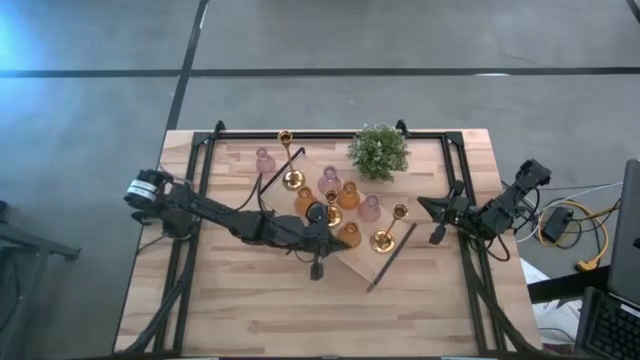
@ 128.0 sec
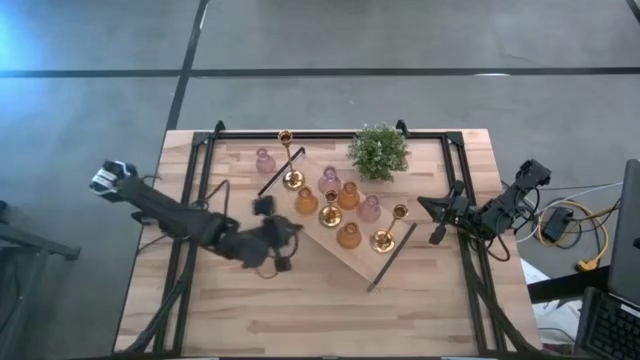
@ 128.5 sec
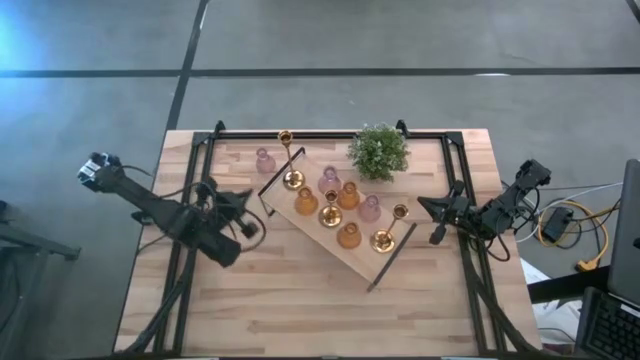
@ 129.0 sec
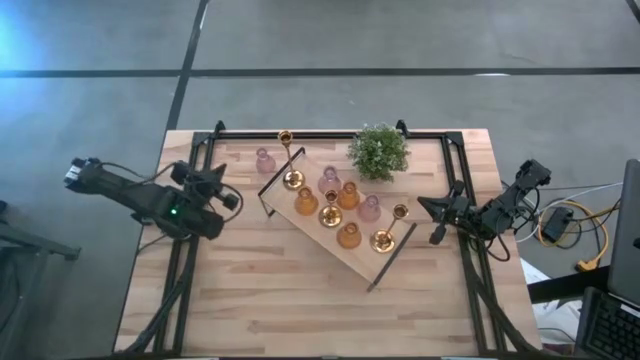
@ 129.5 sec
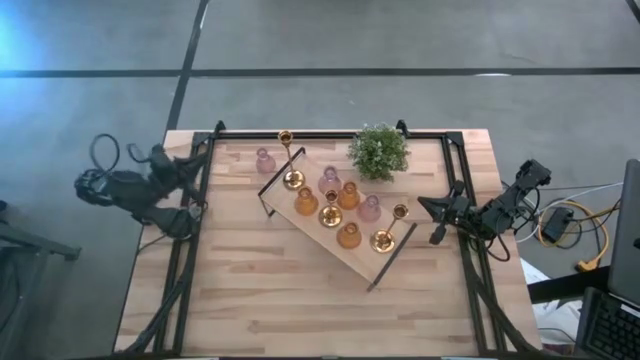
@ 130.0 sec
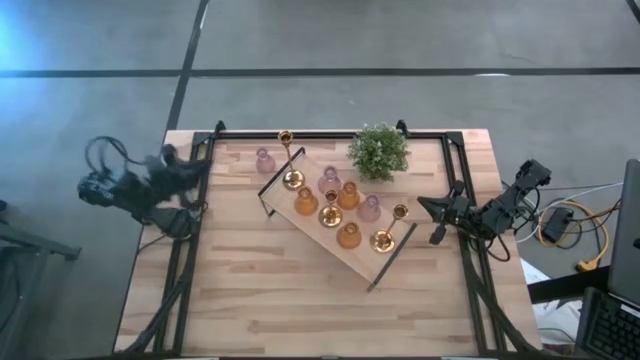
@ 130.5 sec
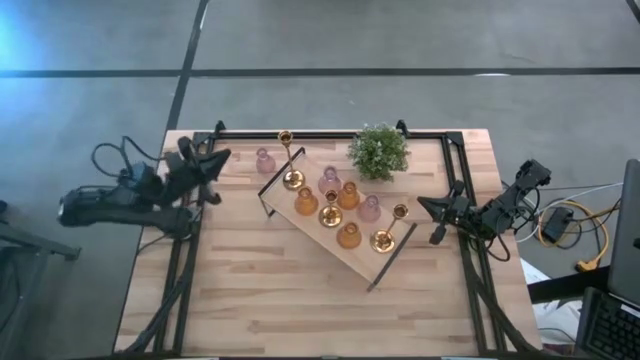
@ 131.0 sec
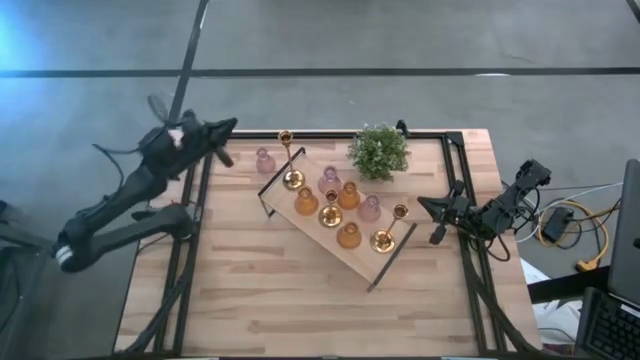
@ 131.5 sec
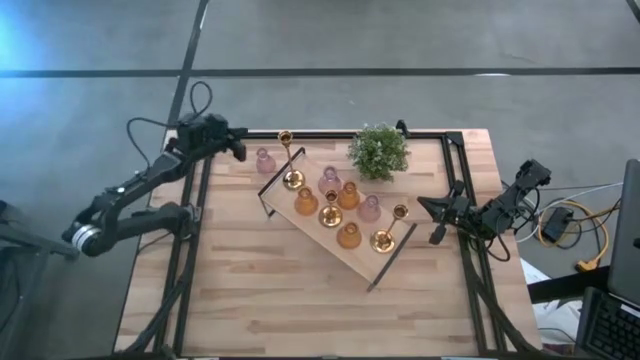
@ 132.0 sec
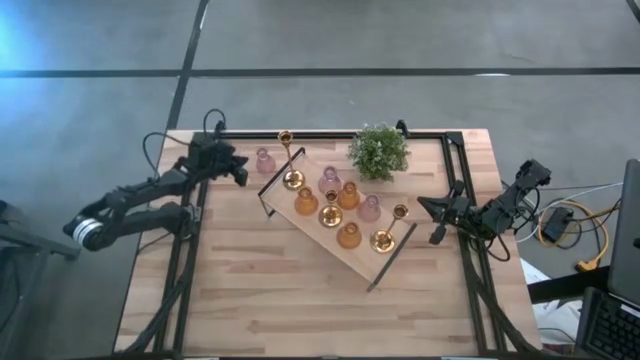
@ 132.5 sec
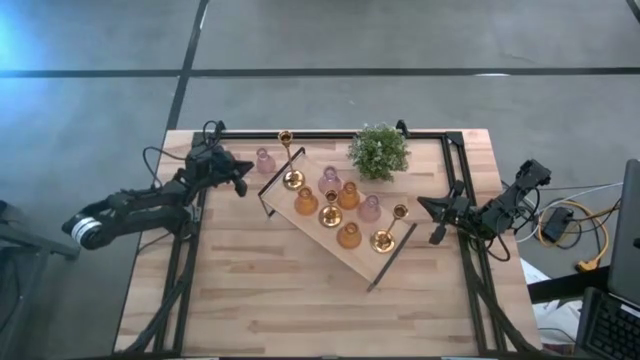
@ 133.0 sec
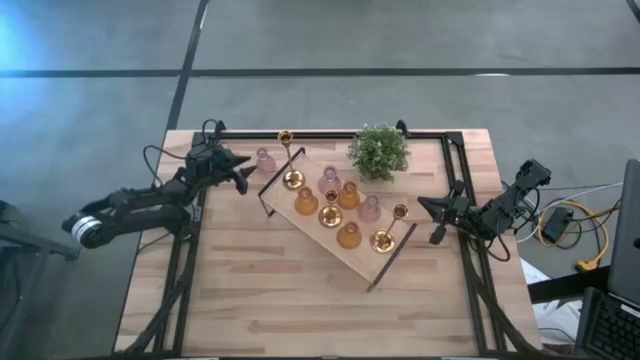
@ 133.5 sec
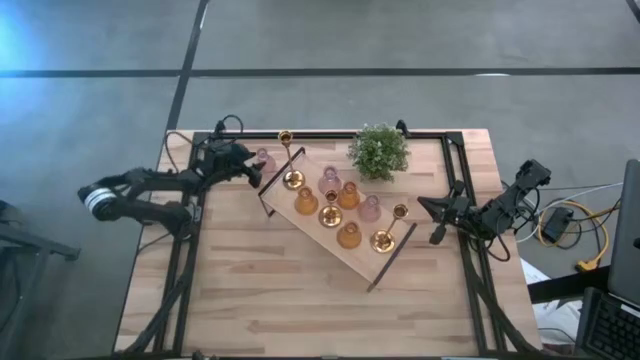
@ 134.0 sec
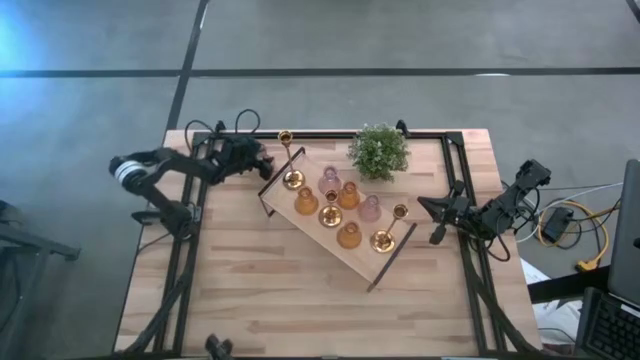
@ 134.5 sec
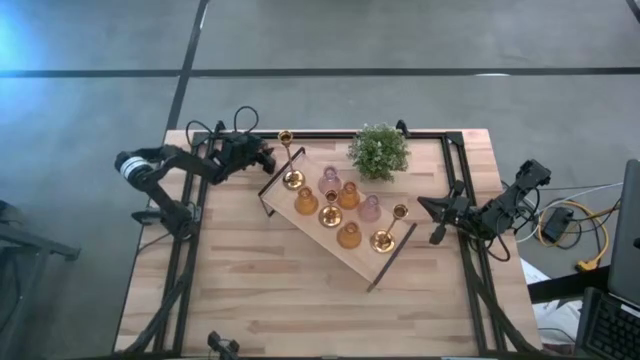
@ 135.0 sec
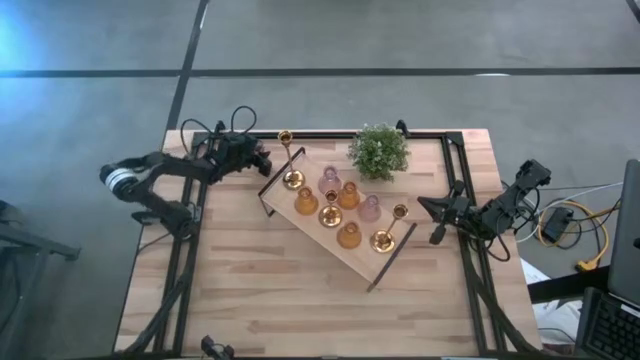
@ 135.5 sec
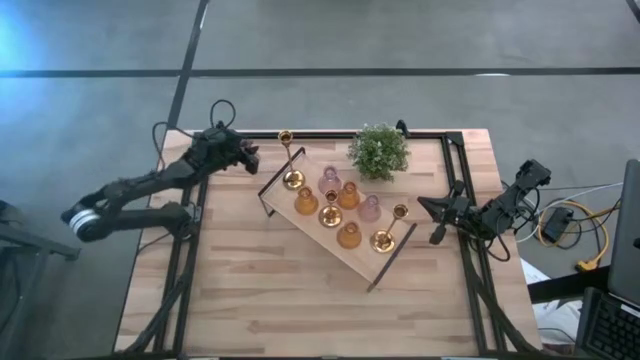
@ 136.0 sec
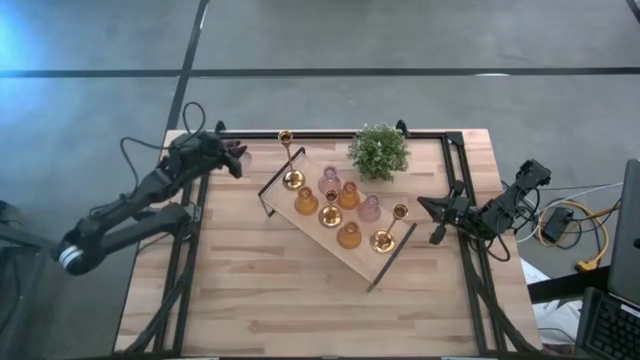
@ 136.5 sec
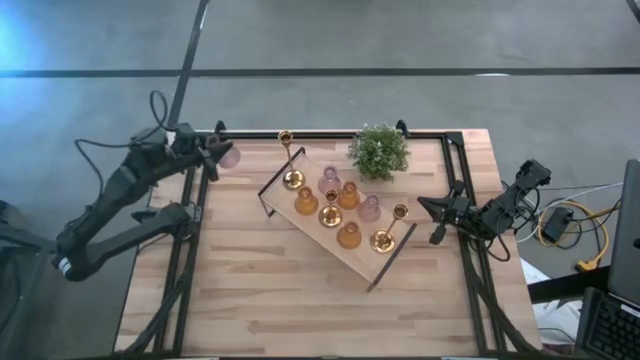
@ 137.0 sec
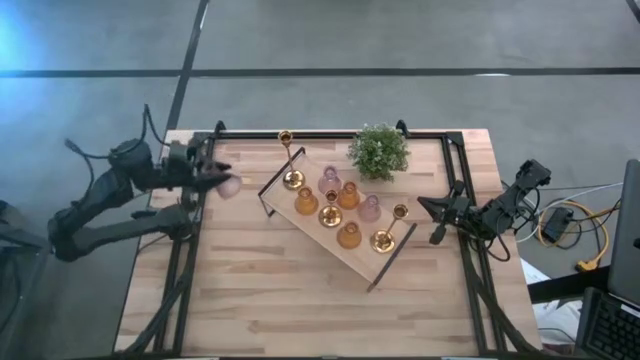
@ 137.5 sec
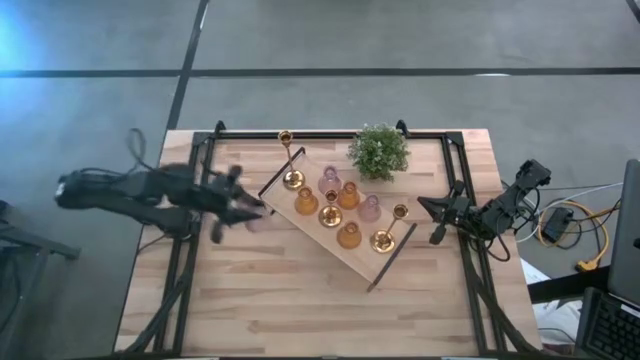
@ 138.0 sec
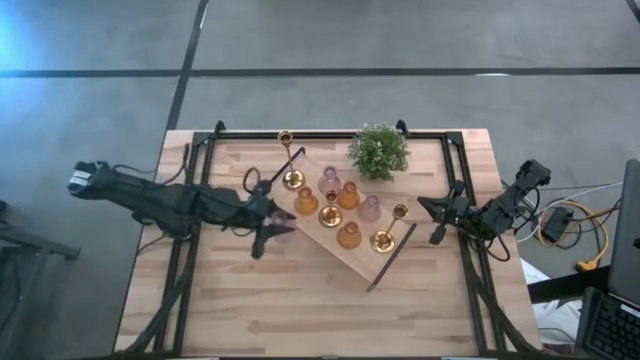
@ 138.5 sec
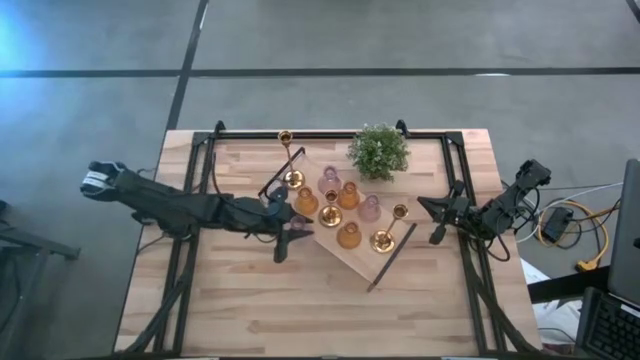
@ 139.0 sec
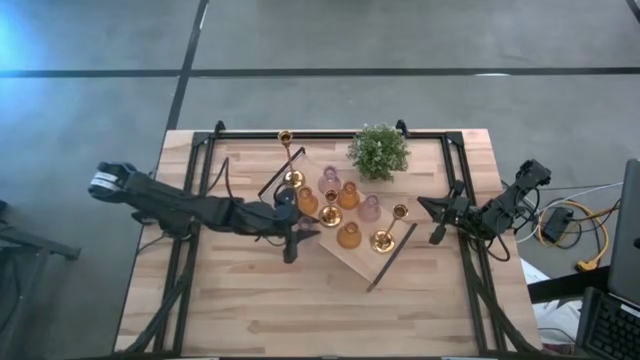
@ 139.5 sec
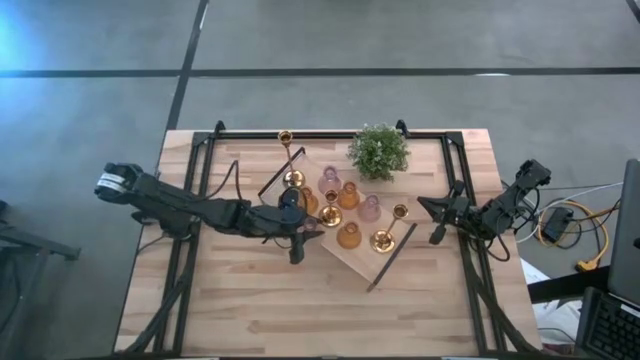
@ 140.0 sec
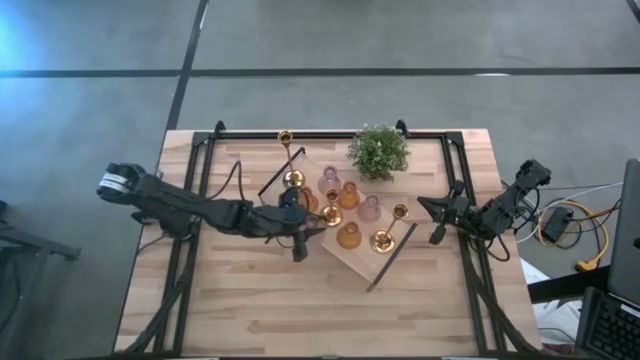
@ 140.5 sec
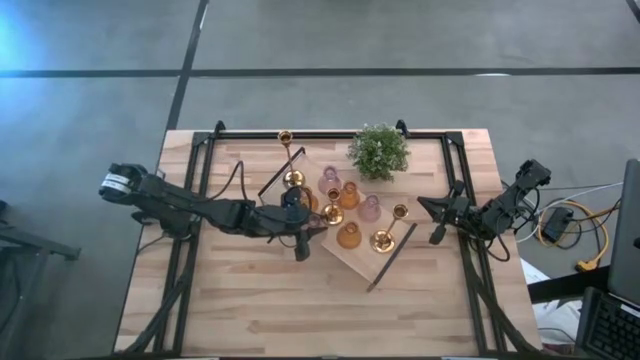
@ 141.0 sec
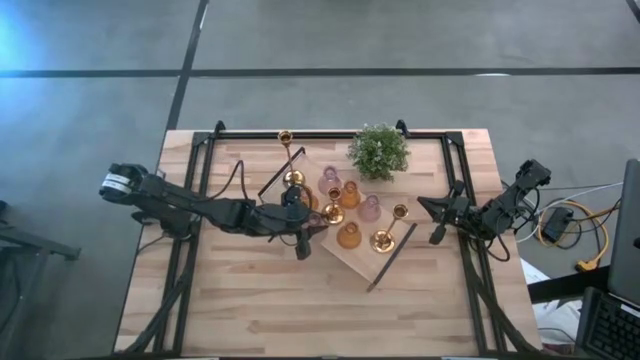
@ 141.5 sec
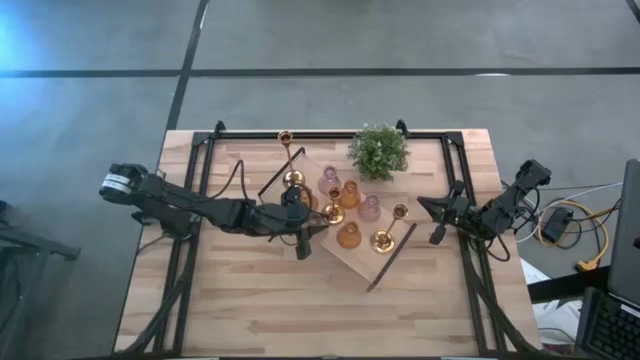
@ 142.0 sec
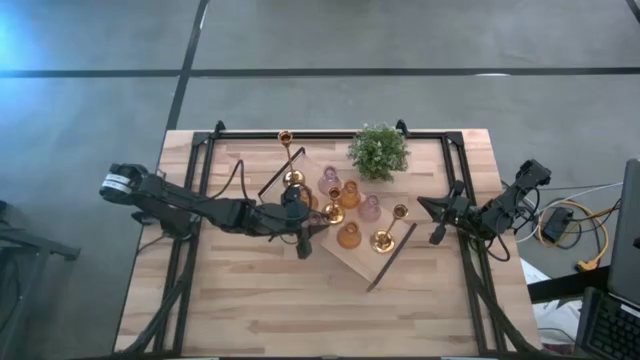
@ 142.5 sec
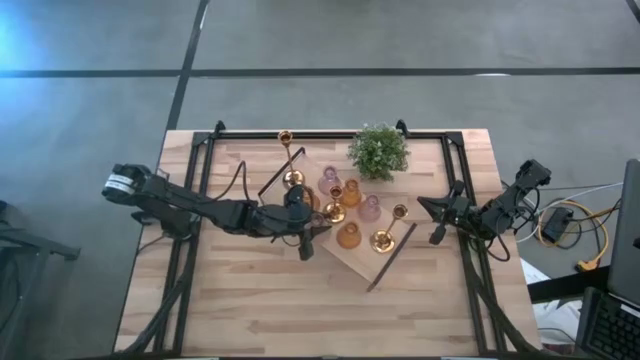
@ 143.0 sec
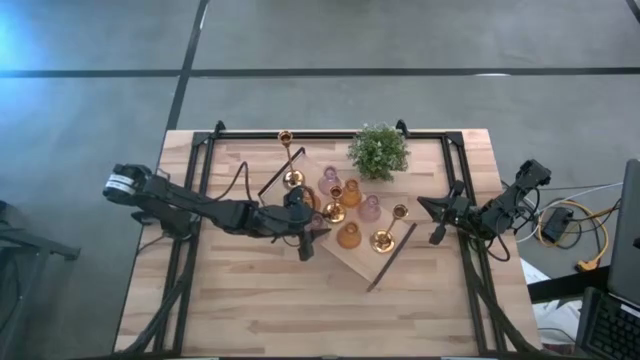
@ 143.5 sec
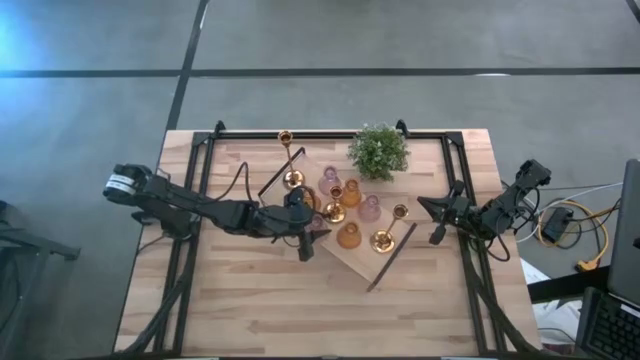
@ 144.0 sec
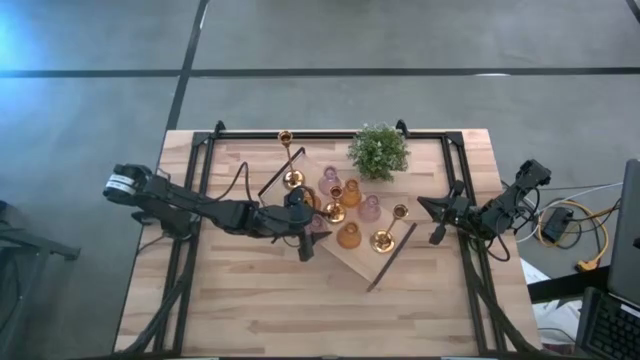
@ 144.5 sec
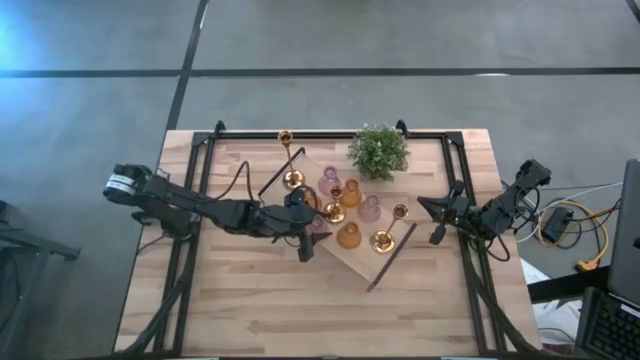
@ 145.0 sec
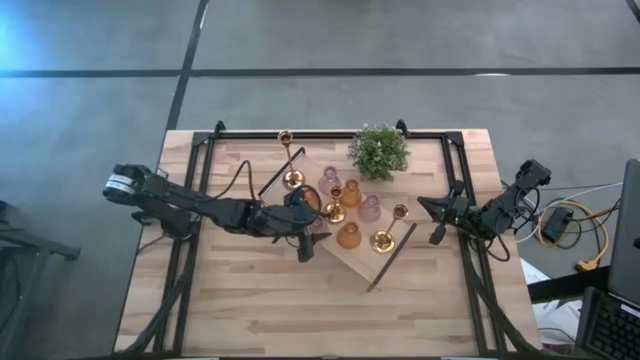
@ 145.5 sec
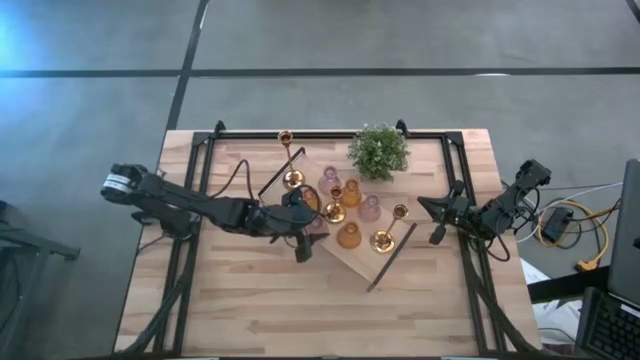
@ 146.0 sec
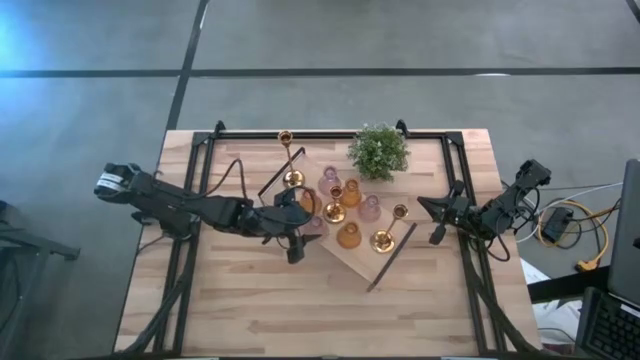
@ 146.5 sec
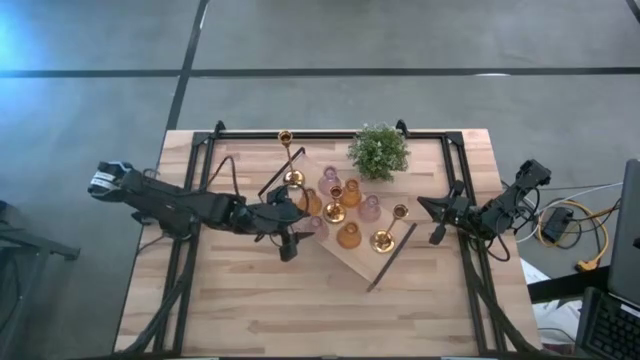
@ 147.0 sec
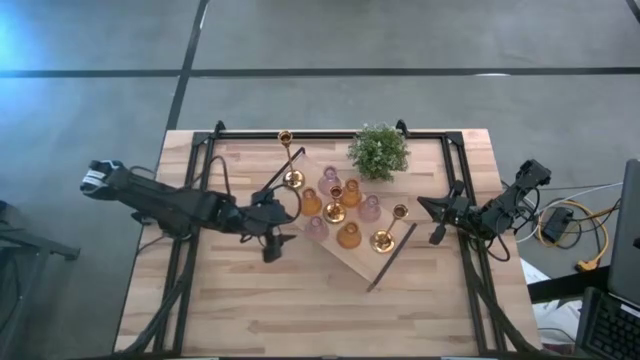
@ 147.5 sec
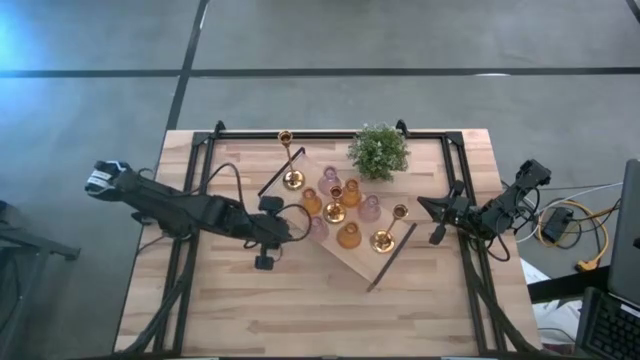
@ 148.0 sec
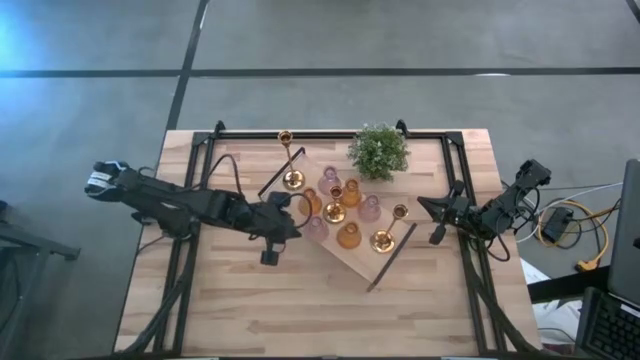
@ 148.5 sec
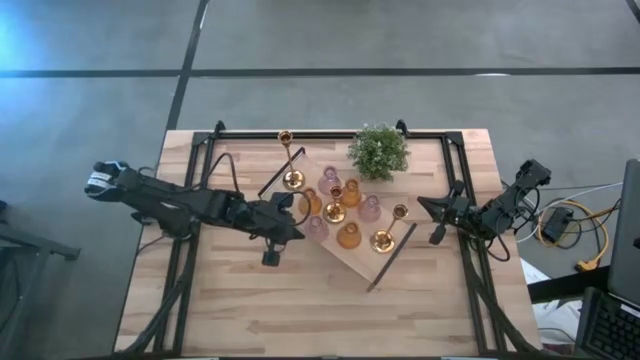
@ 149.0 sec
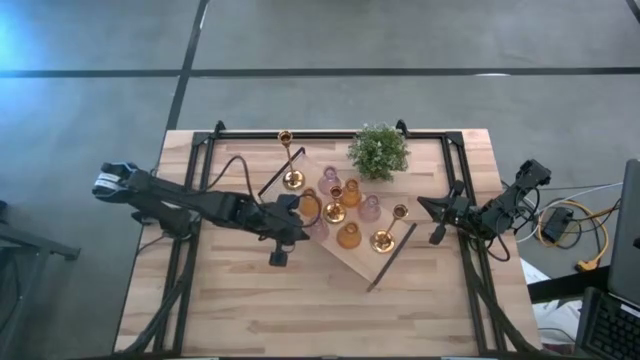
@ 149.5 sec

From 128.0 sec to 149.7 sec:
Task: Pick & Place candle stick holders
Put the light pink glass candle holder on the shelf
